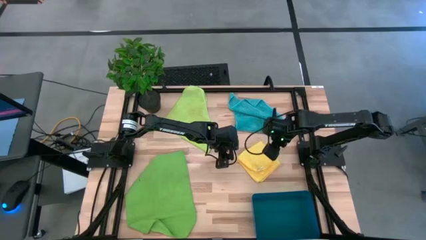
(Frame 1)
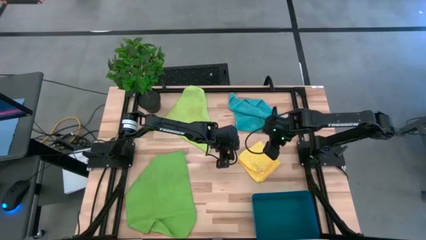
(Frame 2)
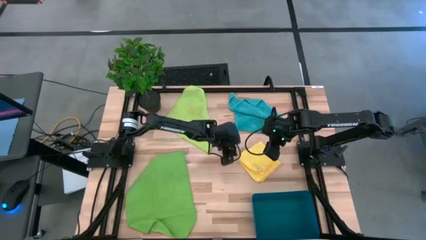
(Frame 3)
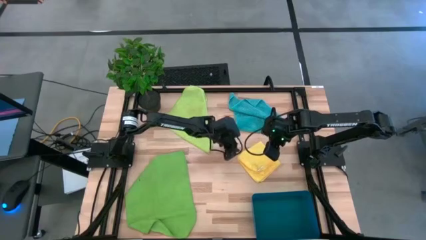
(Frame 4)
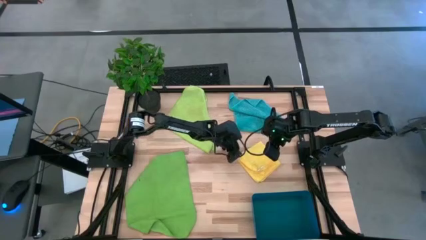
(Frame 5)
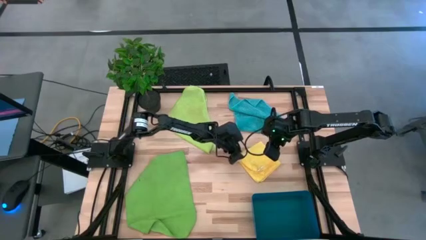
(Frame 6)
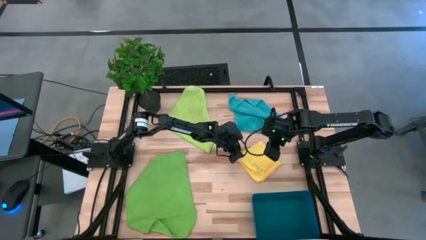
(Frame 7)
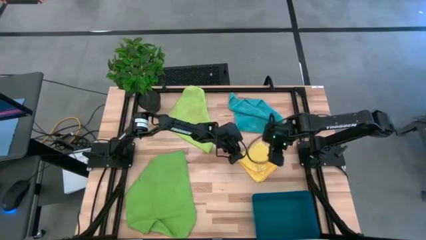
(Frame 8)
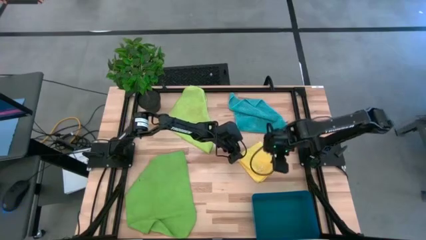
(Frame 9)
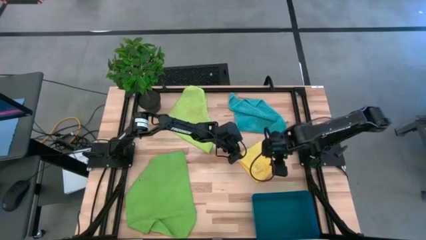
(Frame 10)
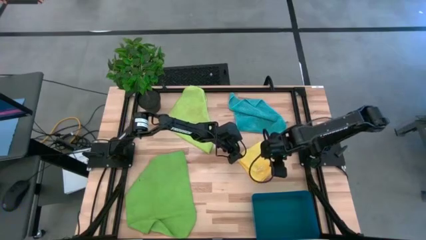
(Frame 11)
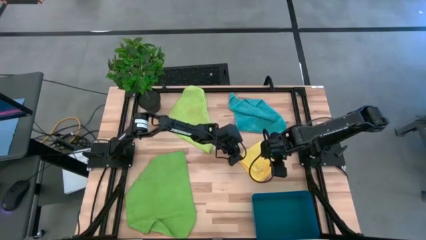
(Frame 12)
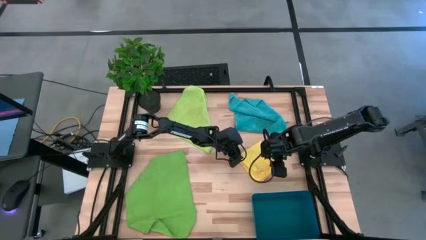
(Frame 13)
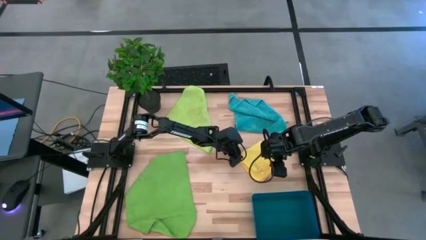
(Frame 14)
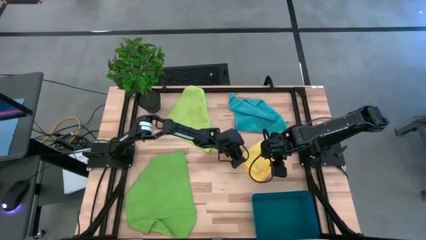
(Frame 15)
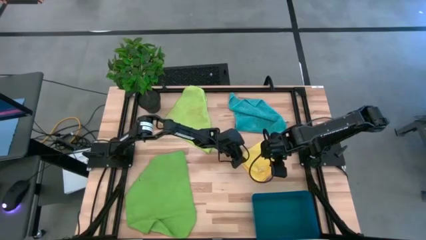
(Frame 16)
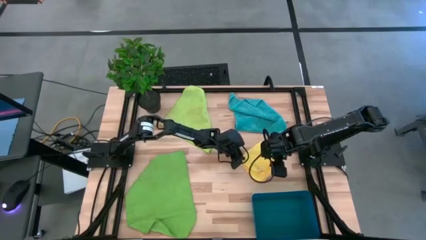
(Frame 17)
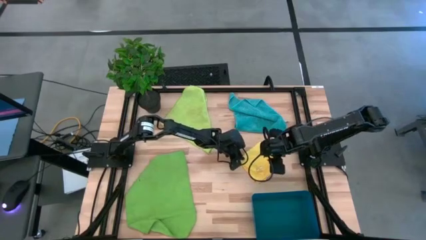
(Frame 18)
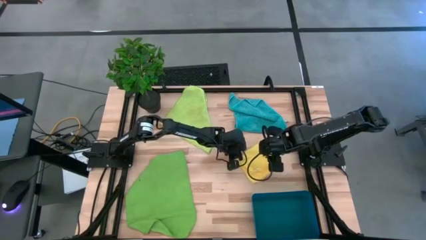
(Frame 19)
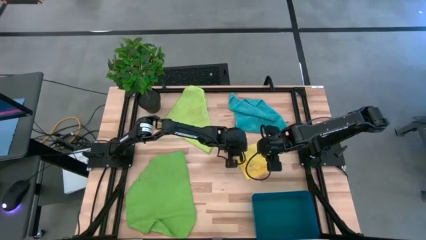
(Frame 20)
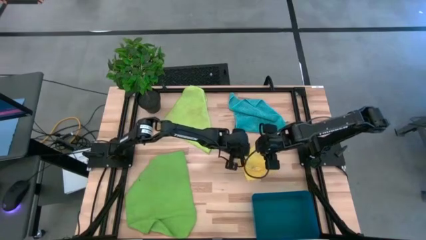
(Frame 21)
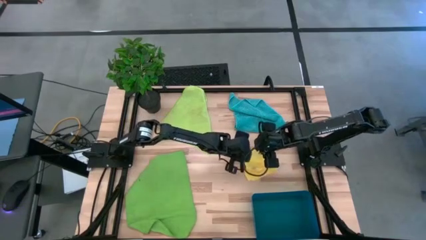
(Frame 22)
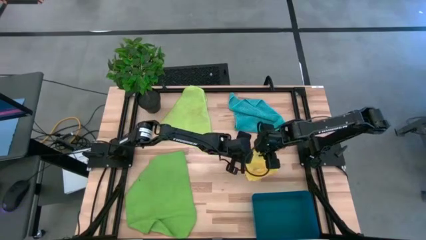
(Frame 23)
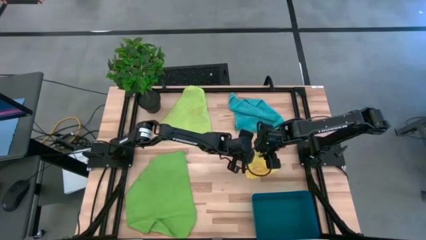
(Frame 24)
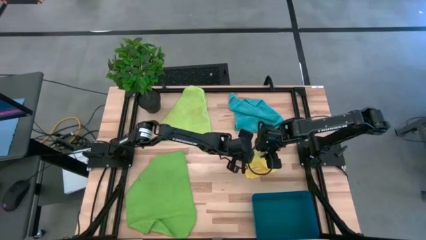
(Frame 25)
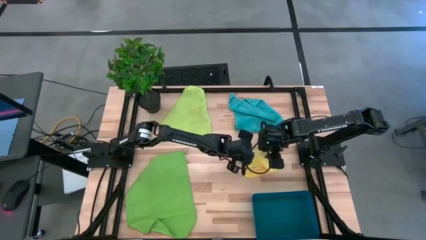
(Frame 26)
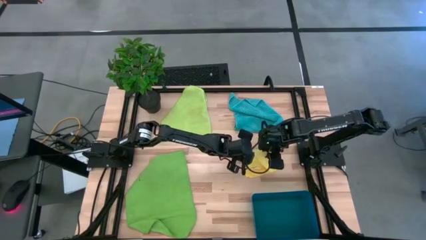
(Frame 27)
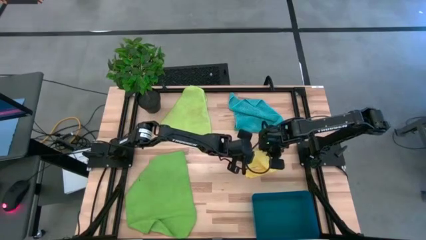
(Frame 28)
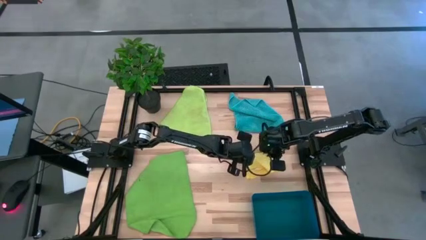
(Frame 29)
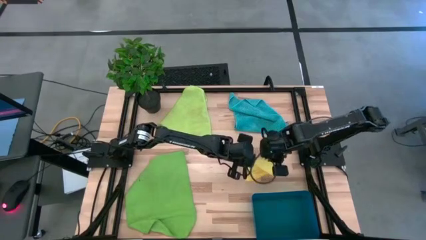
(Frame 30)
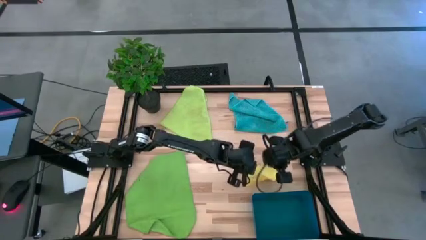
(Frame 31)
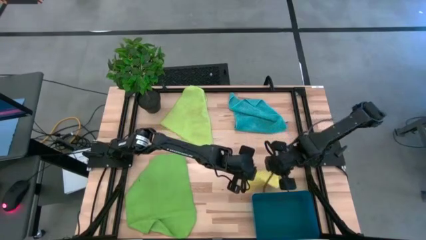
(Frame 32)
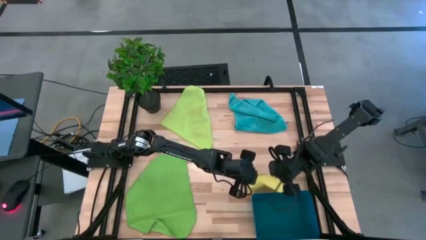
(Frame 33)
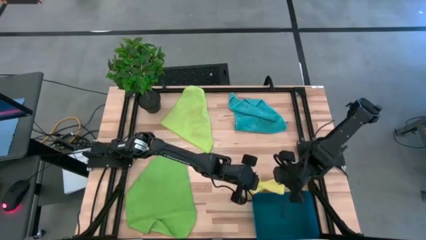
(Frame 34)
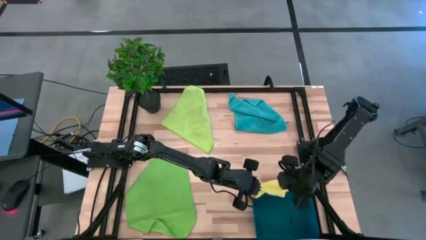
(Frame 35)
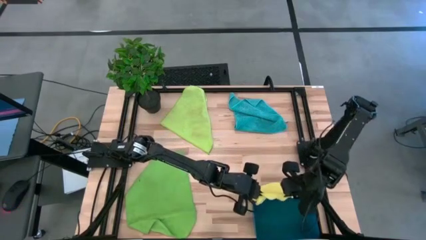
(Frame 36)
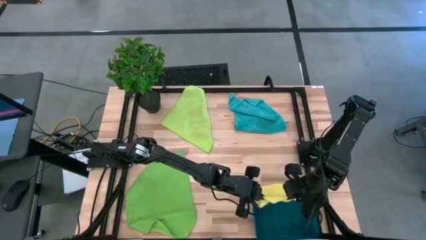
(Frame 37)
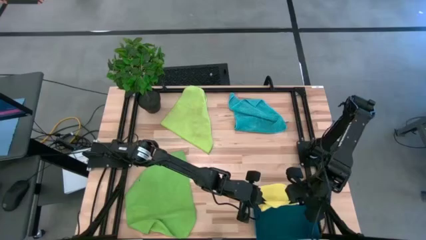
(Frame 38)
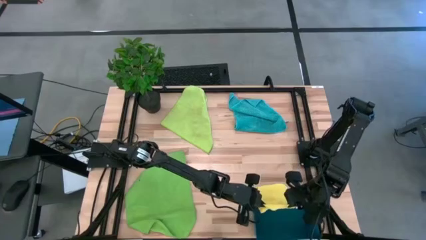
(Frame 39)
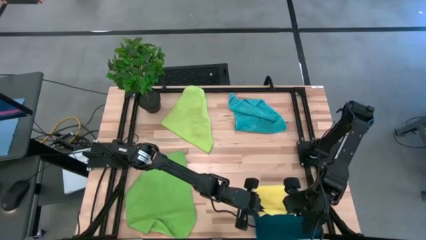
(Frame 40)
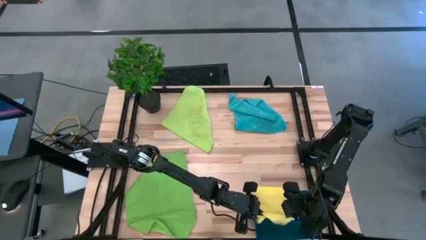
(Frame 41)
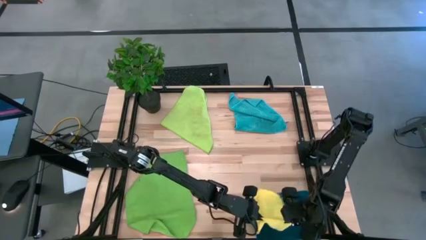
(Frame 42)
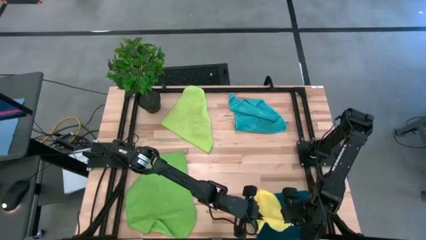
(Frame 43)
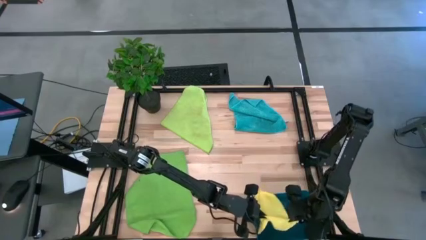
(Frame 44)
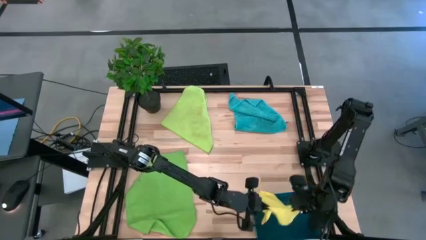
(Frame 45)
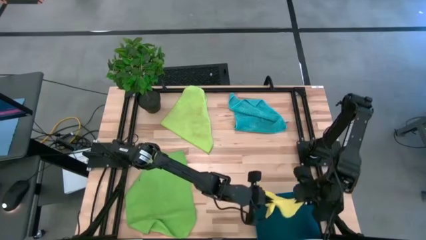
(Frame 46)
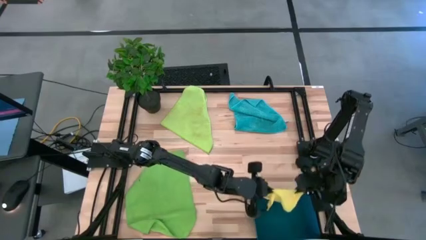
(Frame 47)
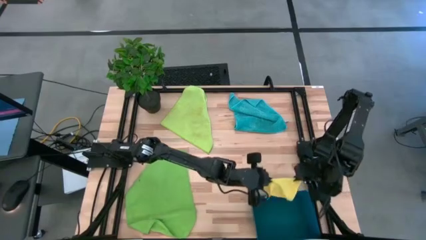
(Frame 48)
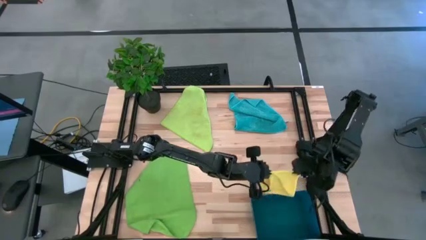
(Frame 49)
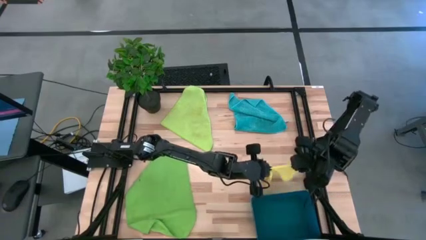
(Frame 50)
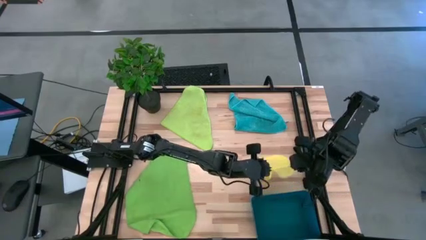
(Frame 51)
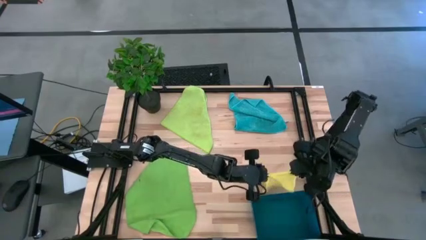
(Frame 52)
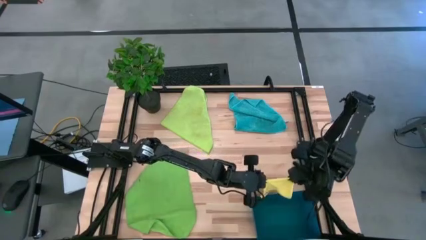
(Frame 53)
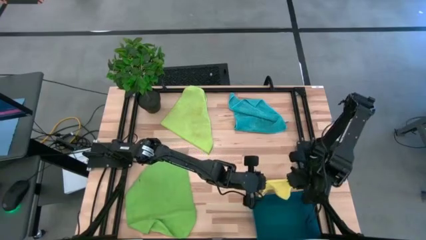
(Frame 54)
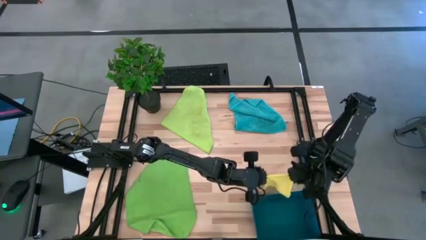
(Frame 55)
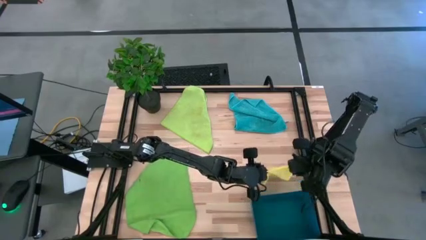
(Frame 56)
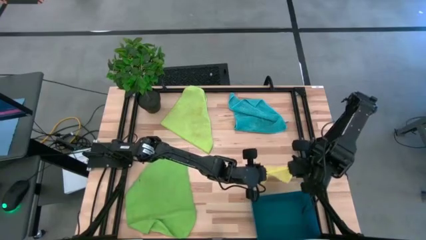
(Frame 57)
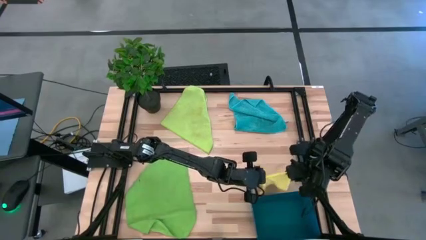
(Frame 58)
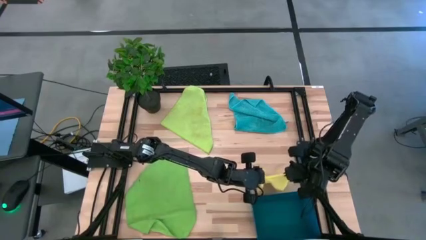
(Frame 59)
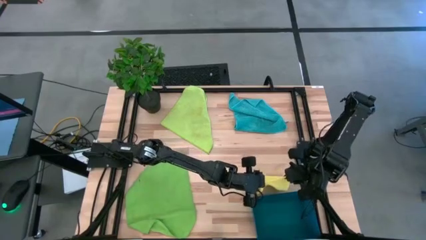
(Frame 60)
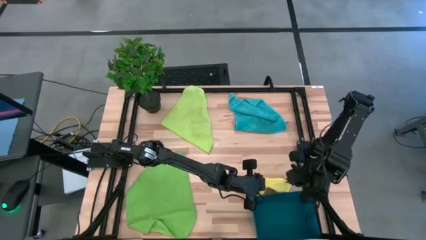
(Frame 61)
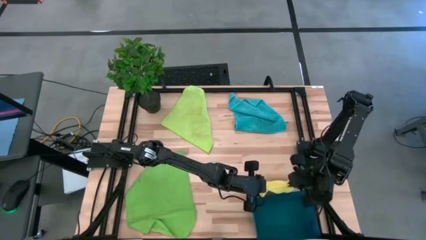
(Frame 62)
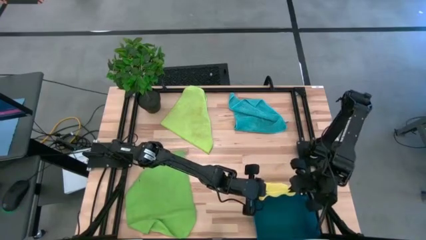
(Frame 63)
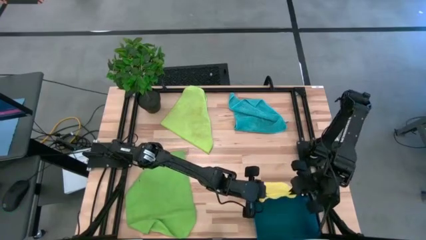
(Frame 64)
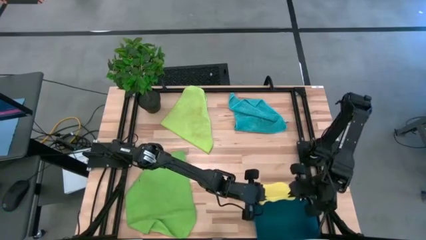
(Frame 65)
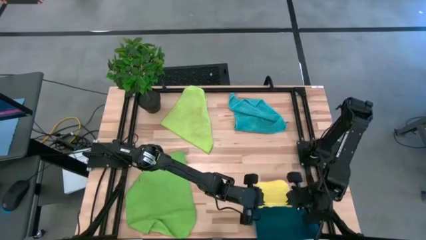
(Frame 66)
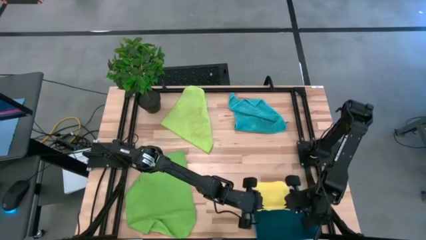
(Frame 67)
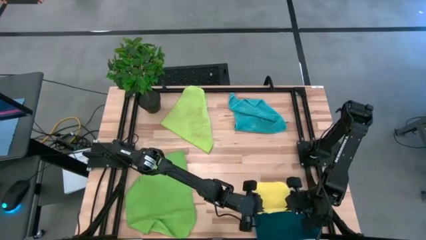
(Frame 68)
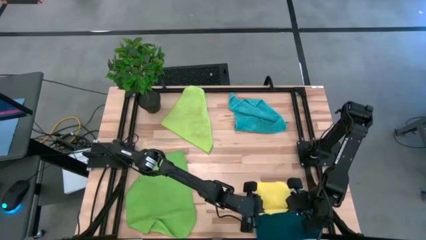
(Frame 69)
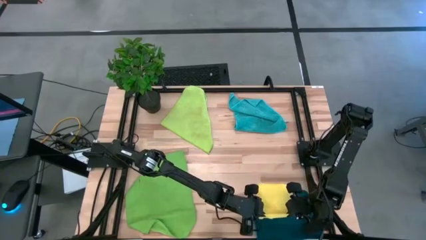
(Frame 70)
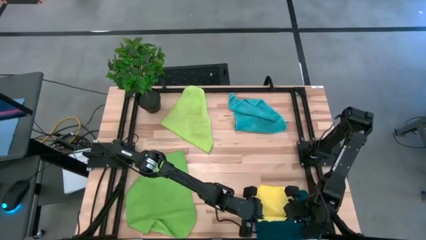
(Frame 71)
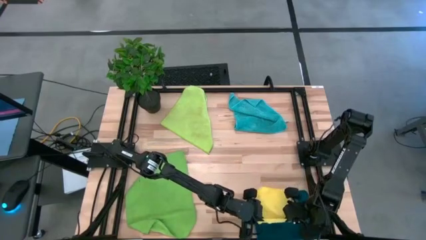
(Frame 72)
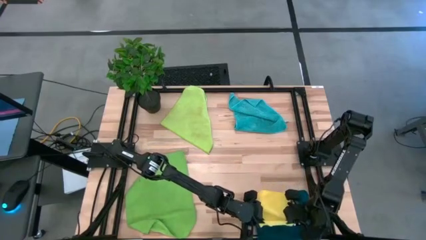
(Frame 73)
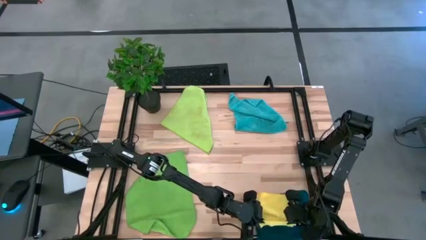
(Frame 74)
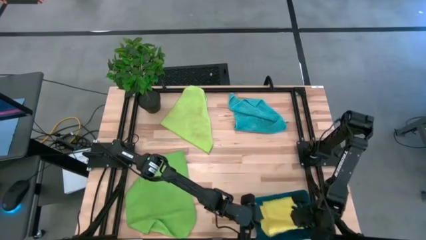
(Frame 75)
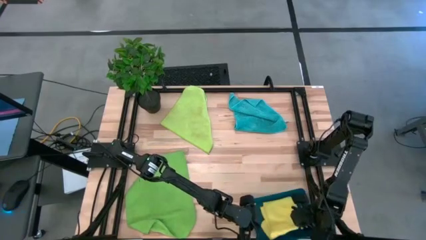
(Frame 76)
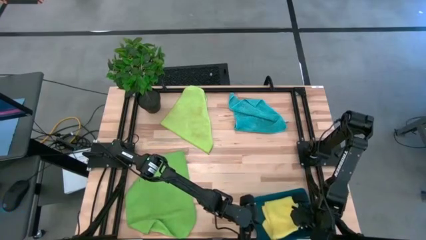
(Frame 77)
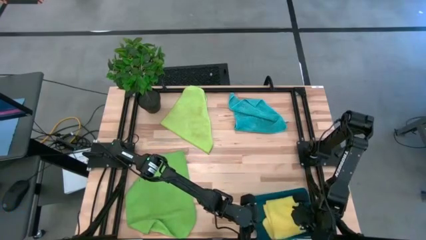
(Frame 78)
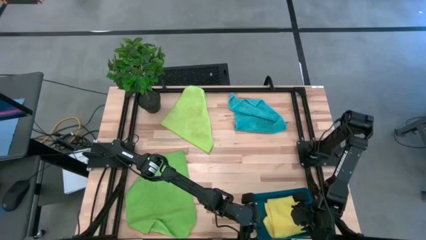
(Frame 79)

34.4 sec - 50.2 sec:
Task: Fold microfiber towels
Put the folded yellow towel into the bin

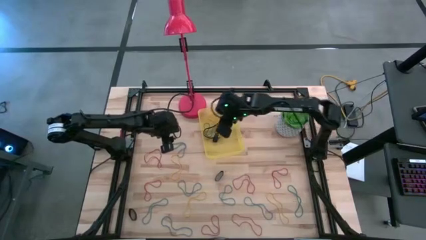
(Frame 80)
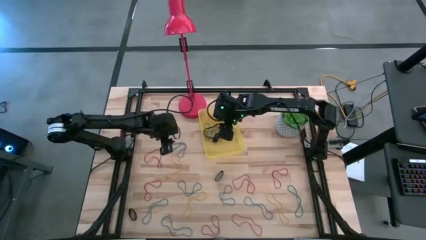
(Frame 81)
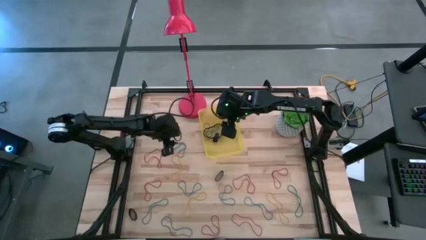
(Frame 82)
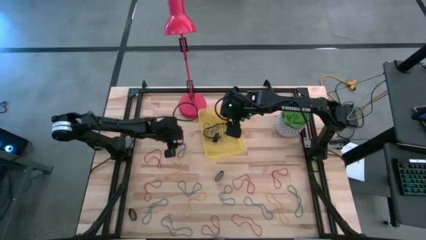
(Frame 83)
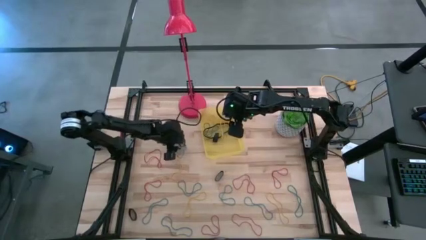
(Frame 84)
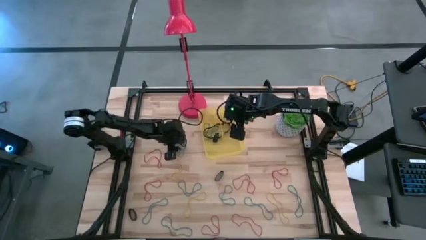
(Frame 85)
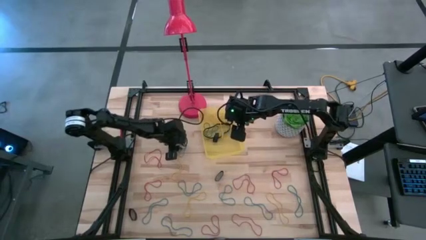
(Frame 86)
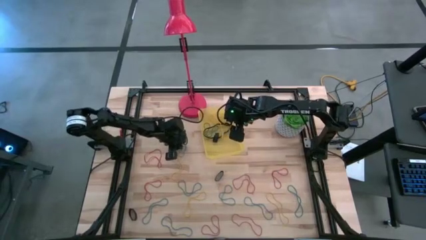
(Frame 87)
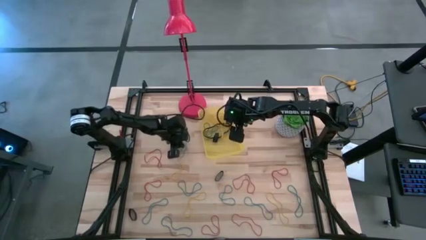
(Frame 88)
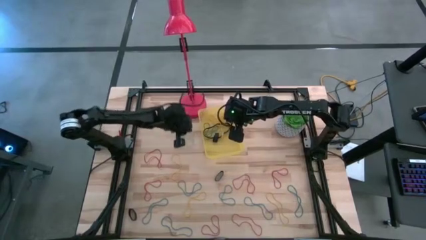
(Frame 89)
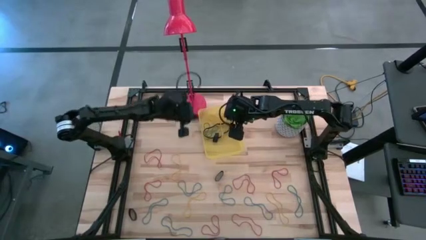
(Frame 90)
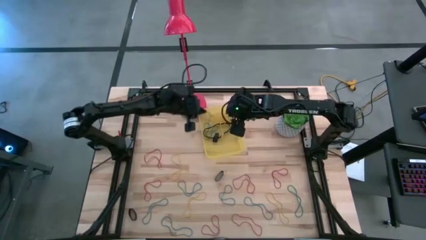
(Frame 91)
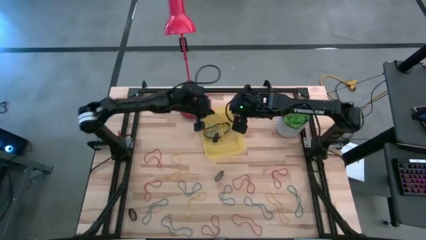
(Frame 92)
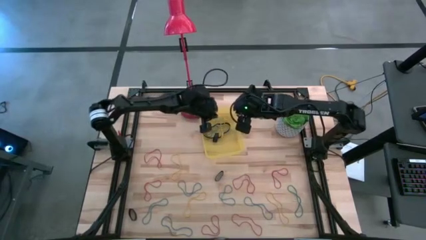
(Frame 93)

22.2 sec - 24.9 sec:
Task: Pick and place rubber bands into bin
Put the blue rubber band into the yellow bin
